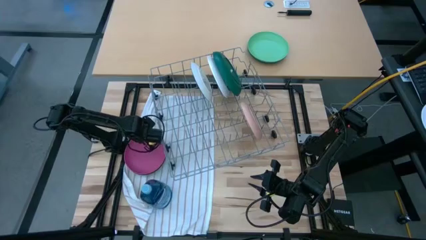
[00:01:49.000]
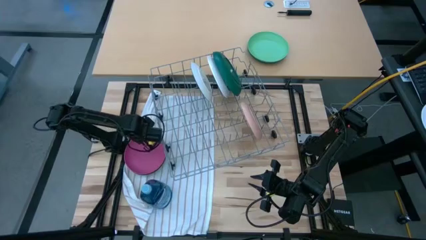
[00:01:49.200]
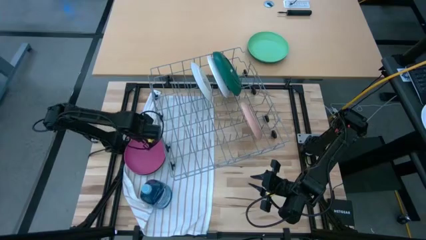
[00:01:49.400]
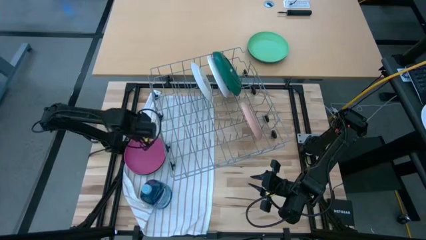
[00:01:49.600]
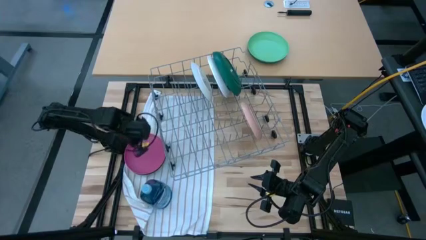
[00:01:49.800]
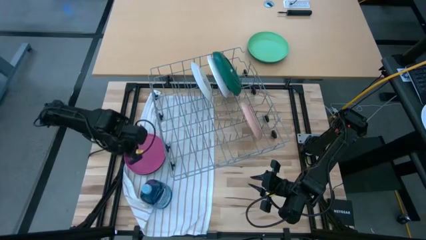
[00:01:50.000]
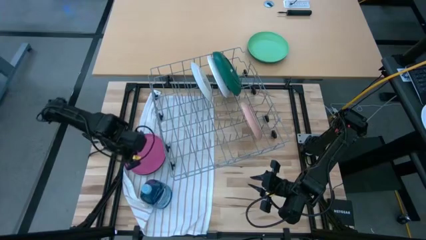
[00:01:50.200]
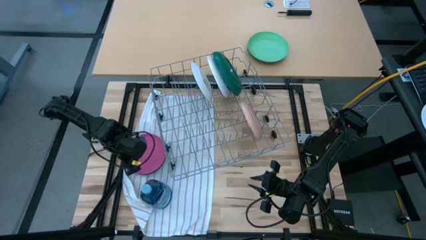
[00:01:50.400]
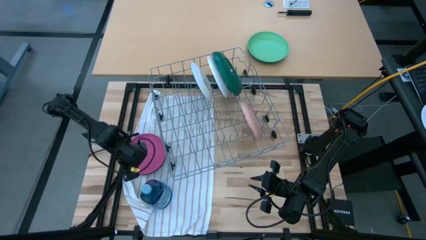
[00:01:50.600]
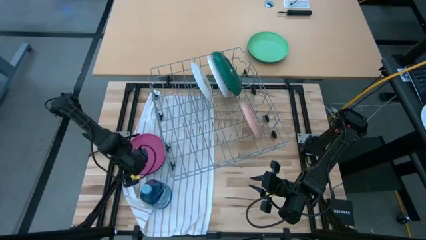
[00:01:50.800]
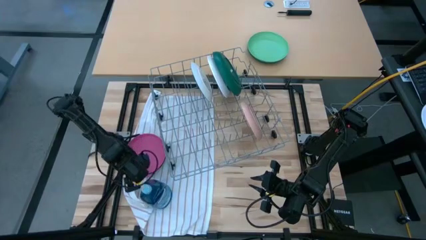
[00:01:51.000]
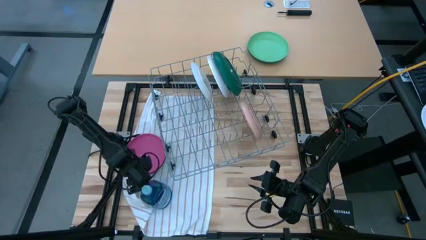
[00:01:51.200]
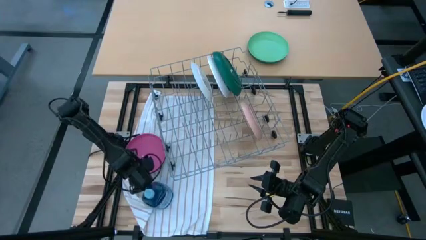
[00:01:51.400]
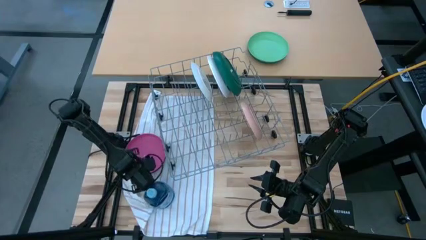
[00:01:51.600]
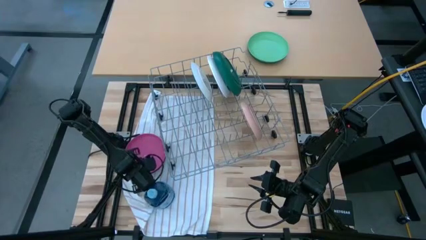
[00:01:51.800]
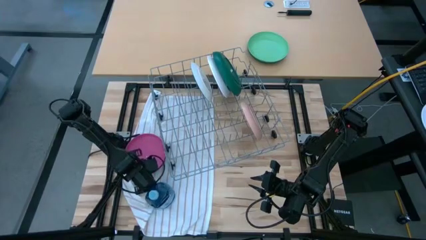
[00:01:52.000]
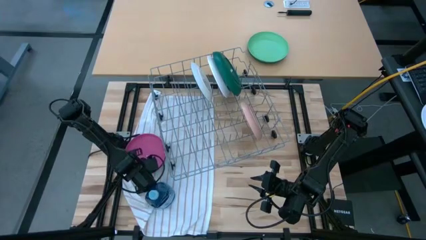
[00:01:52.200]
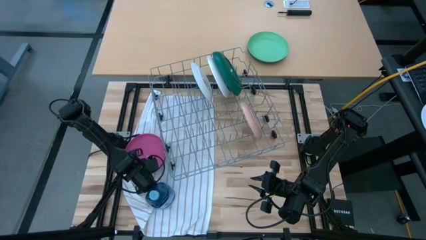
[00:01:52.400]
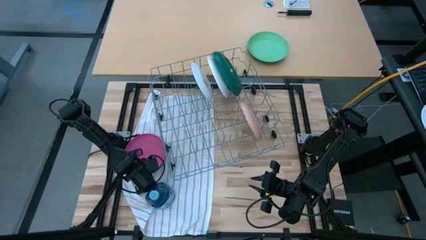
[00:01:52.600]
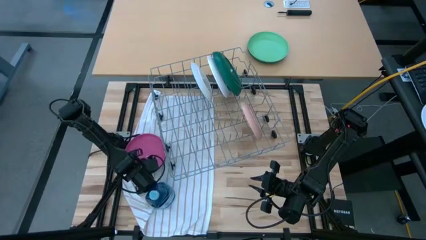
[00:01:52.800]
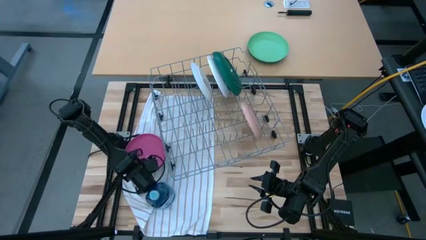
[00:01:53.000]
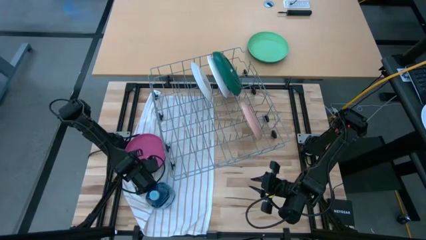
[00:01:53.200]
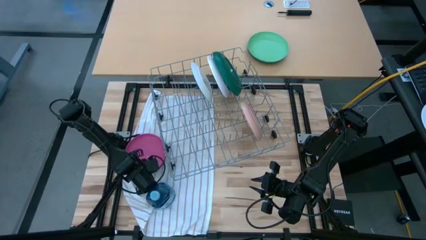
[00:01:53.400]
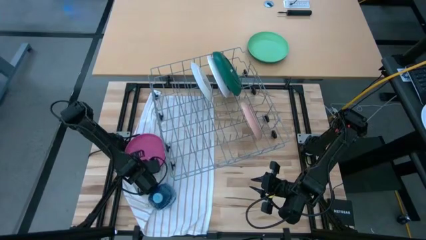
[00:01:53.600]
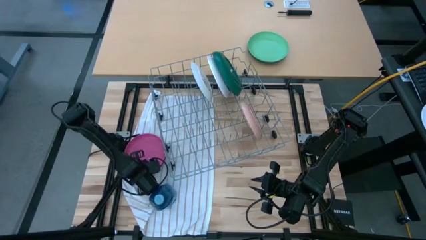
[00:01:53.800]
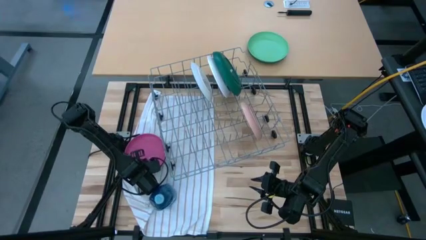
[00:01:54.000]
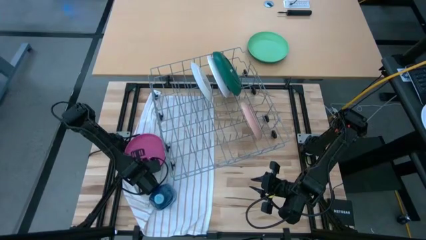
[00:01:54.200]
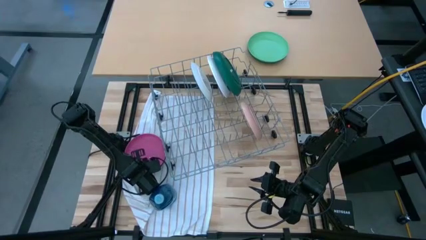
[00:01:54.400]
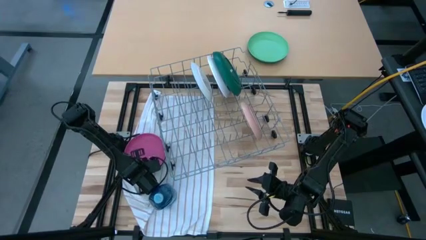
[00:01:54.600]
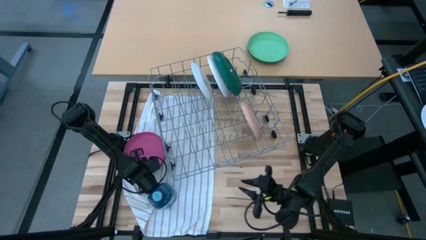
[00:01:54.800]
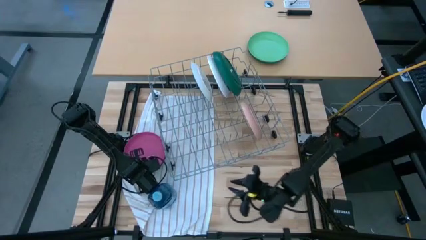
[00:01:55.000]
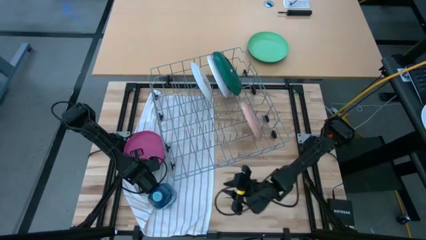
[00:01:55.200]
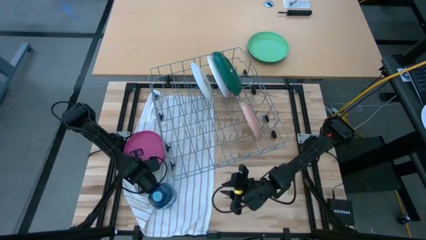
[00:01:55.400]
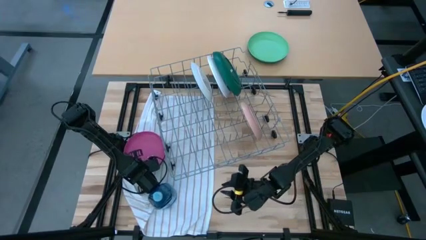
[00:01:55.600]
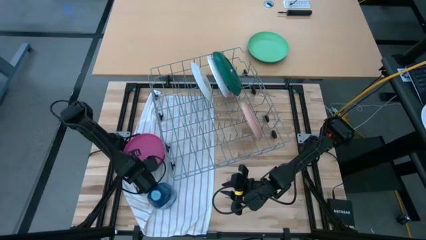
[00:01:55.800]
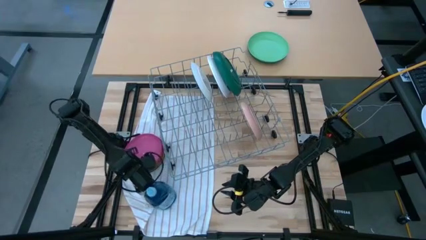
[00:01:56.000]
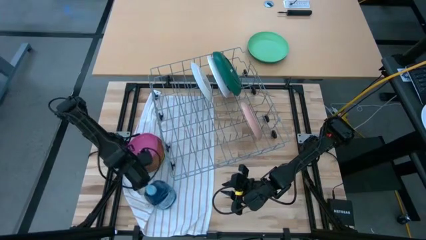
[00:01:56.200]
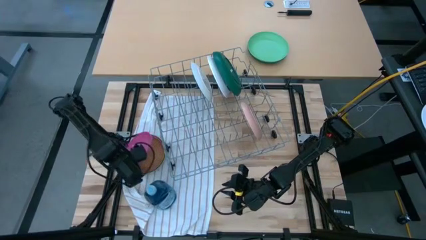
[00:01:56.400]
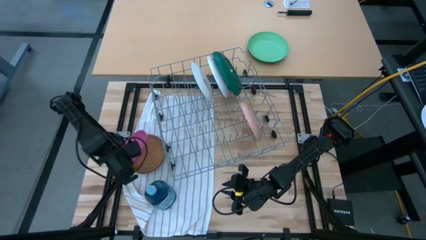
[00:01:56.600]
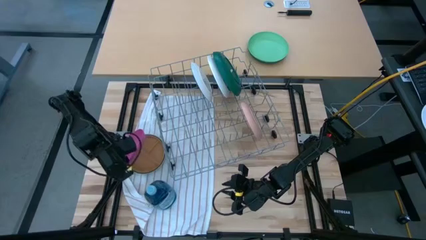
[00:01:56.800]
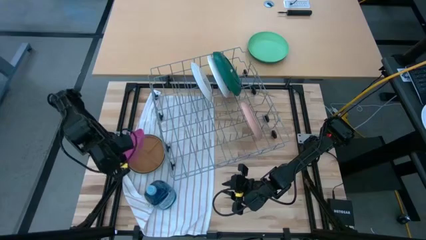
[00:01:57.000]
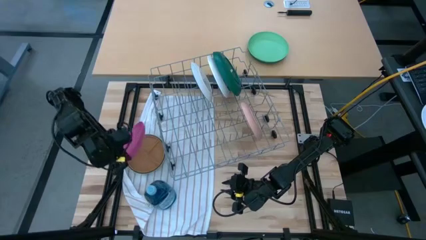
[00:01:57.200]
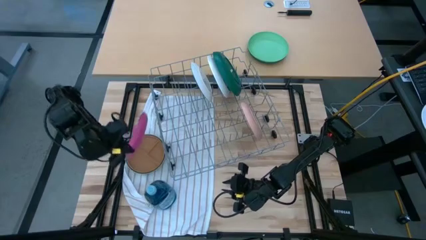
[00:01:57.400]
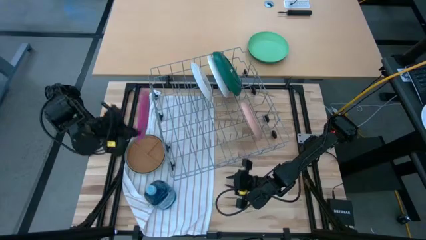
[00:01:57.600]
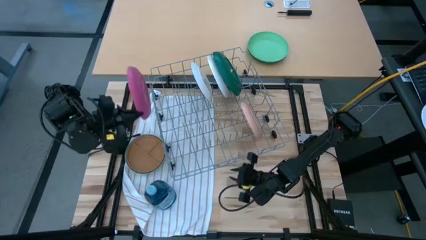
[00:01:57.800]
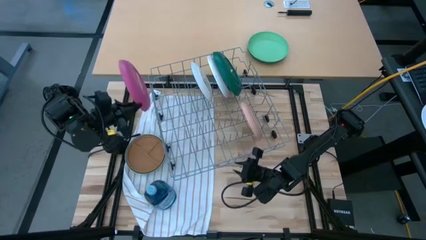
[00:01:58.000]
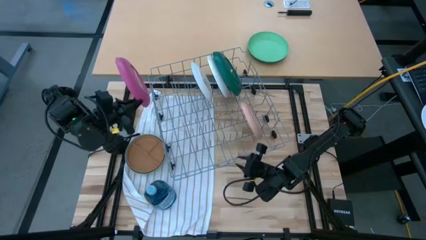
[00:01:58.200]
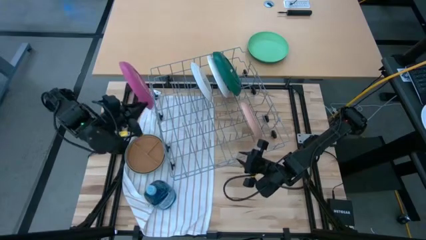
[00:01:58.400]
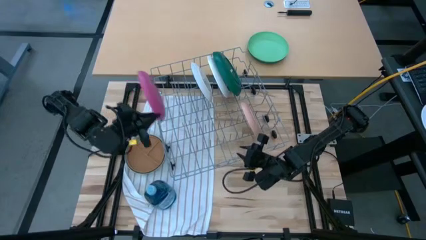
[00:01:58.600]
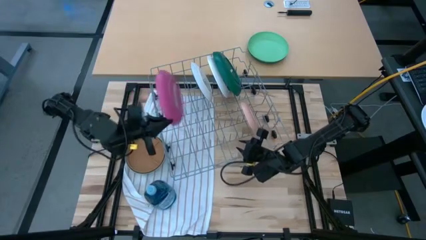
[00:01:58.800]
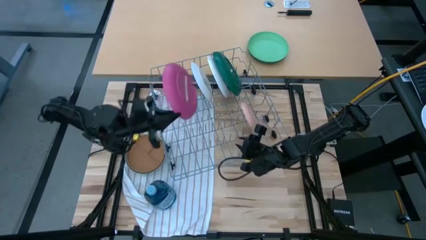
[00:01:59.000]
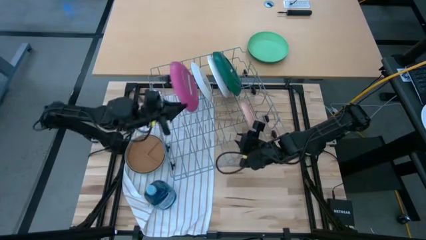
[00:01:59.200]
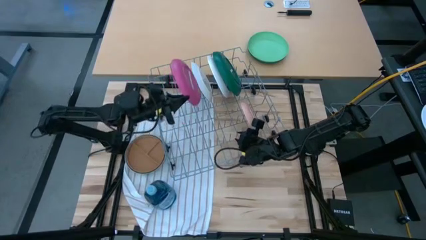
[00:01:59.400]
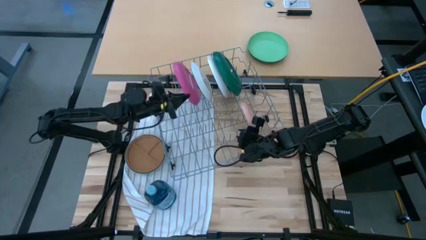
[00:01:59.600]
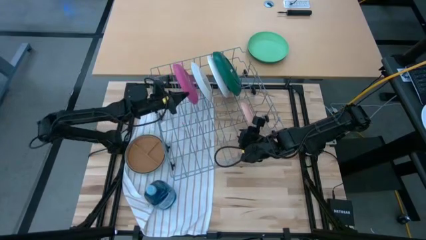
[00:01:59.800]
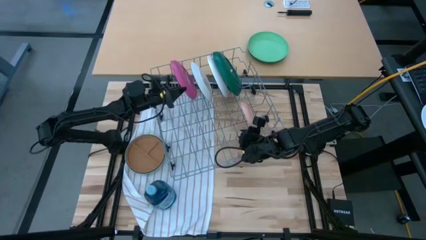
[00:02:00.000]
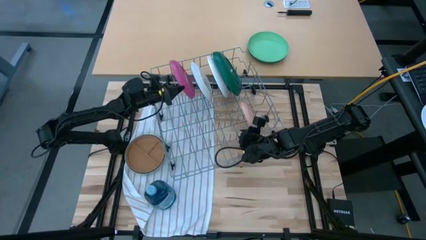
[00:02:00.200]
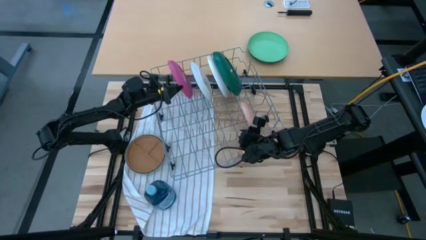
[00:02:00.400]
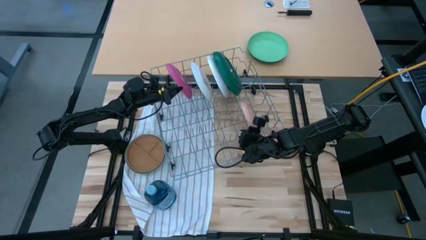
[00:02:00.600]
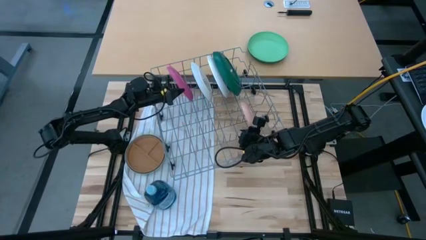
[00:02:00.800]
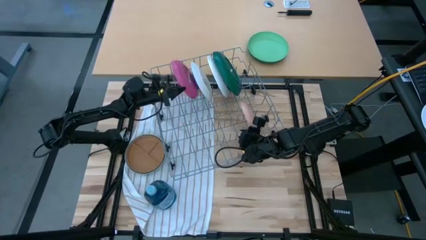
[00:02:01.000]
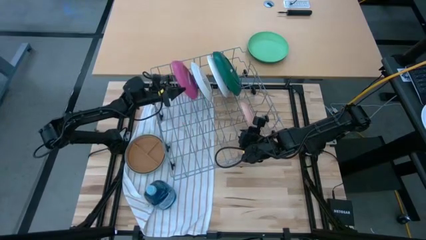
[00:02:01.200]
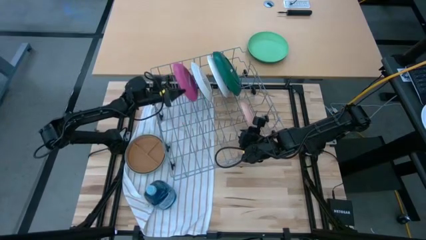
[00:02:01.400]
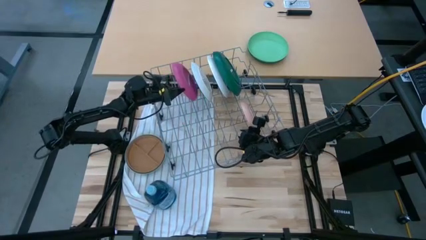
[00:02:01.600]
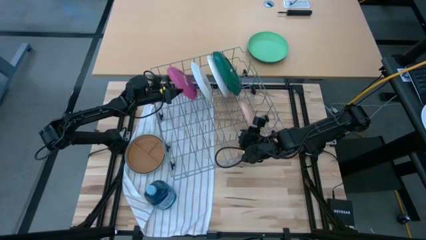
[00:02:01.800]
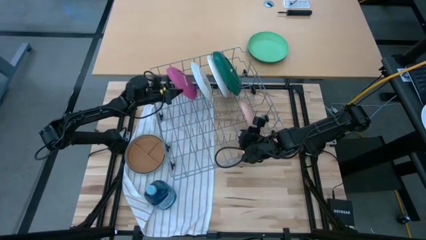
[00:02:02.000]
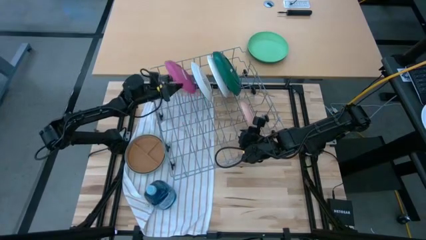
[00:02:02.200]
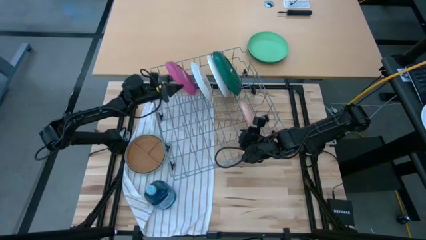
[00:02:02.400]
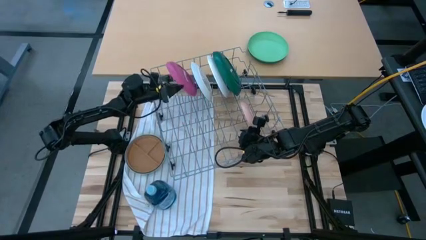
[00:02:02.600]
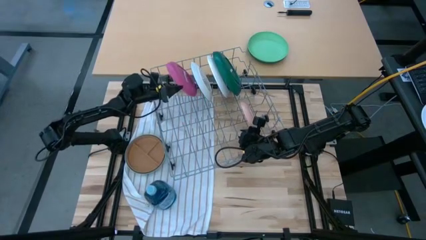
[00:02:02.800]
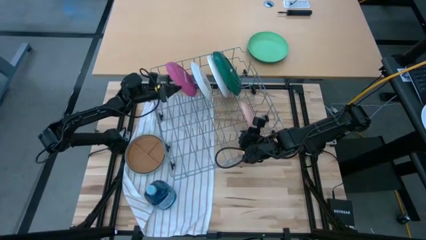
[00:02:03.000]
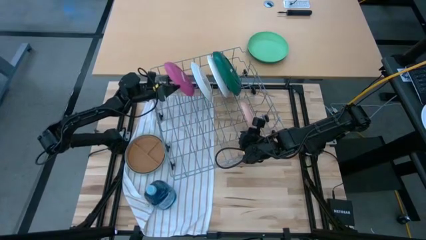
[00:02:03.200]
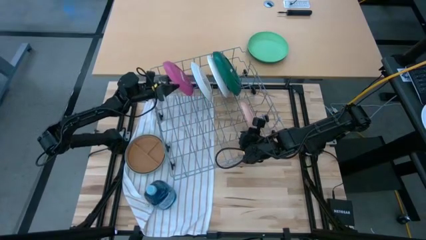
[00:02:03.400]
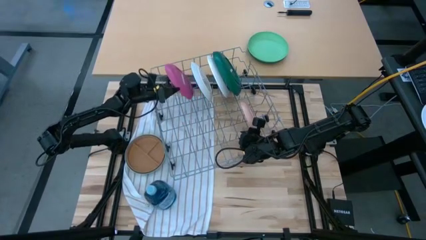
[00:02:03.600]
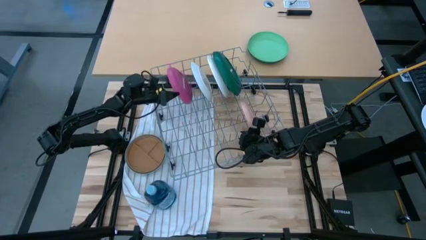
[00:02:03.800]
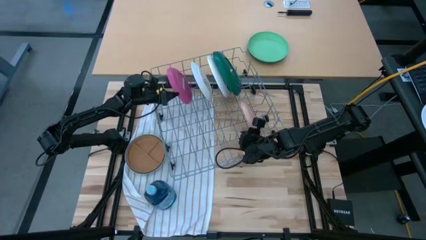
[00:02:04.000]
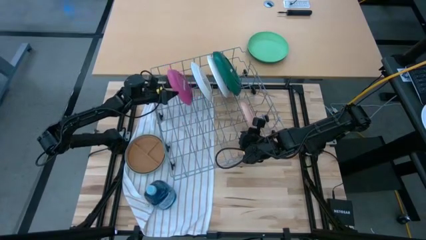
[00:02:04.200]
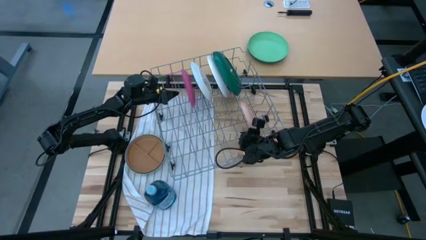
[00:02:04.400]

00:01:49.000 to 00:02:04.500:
Task: Sort dishes
Put the pink plate into the dish rack

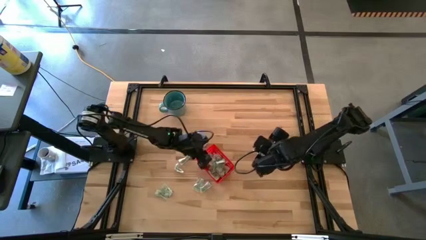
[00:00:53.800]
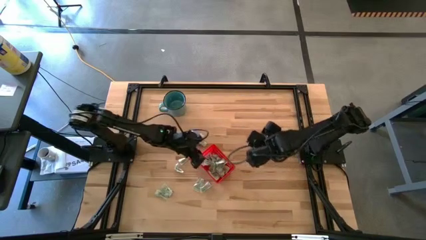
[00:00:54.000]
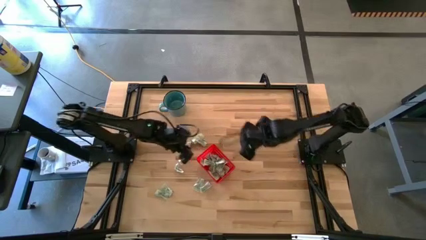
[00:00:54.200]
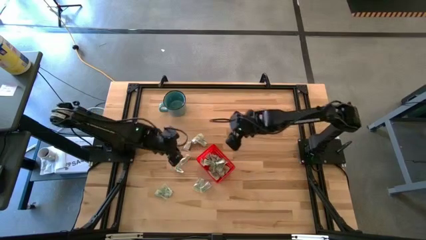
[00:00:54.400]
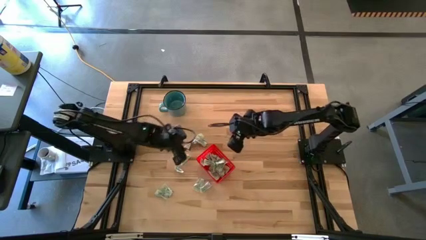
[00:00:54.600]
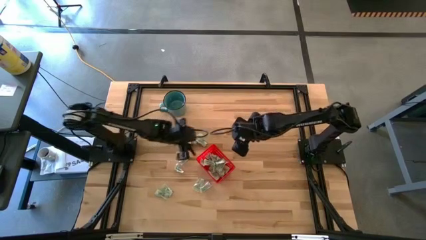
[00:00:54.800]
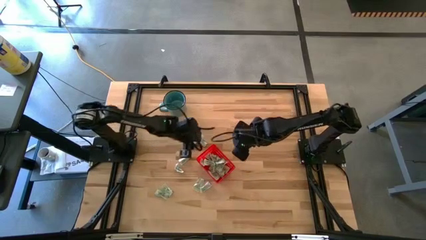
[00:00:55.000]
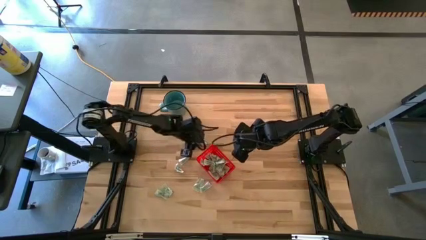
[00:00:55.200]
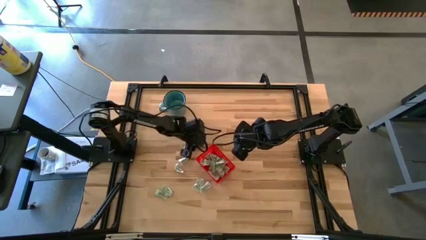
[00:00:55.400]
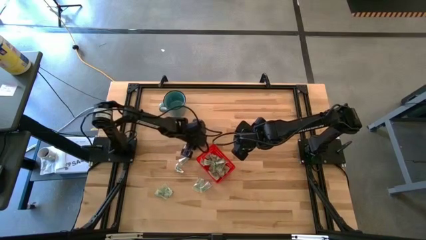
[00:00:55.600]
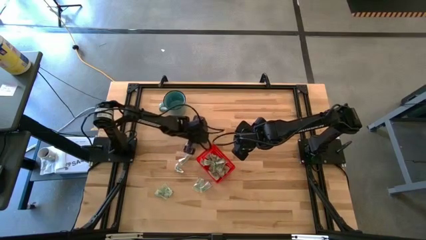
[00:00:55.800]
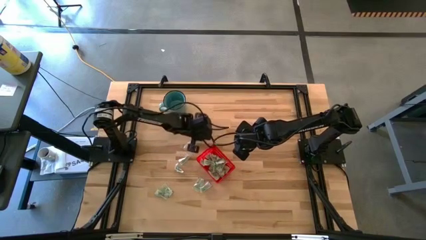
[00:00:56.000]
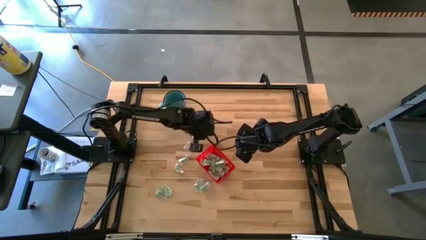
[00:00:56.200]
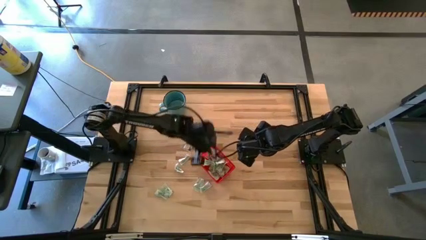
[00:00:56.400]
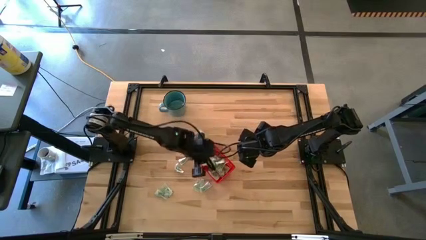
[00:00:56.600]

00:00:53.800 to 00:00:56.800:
Task: Pick and place Stevia / Truvia into bins
Put the white stevia packet into the basket
